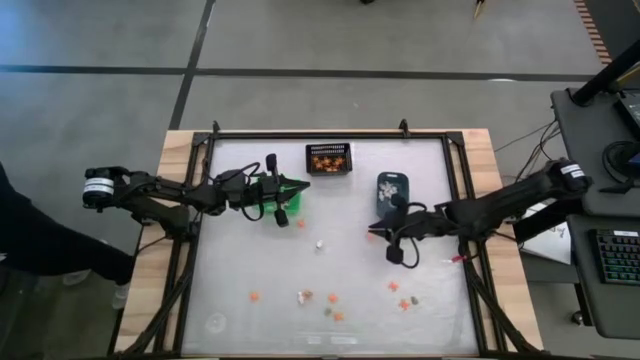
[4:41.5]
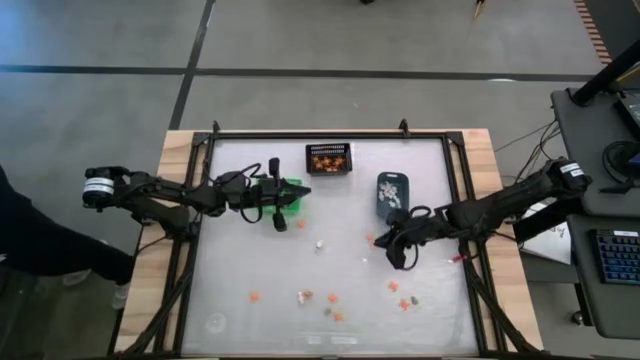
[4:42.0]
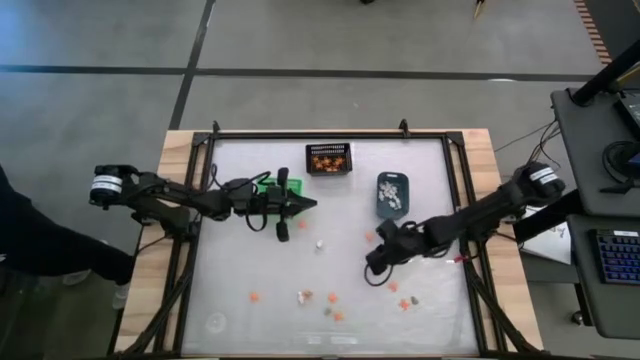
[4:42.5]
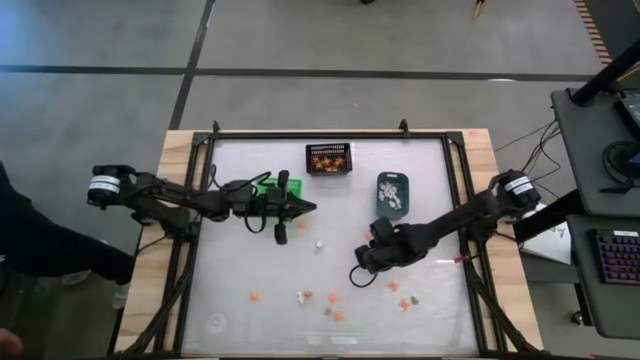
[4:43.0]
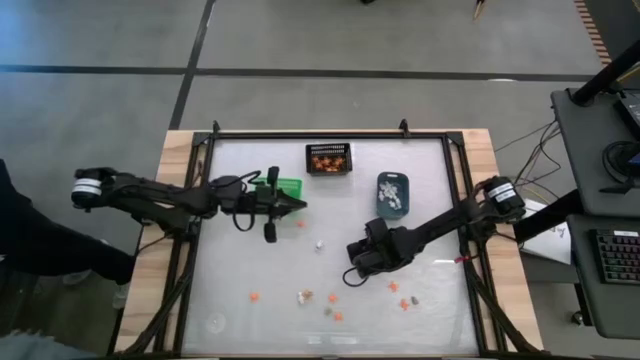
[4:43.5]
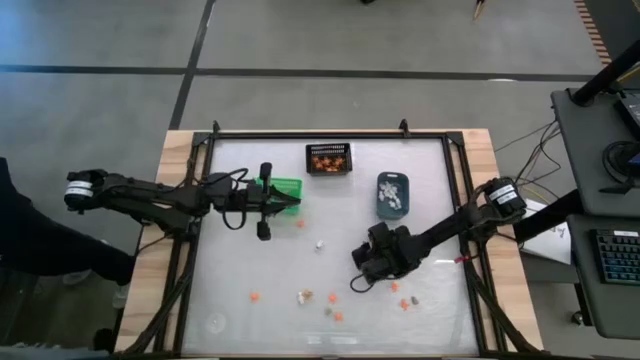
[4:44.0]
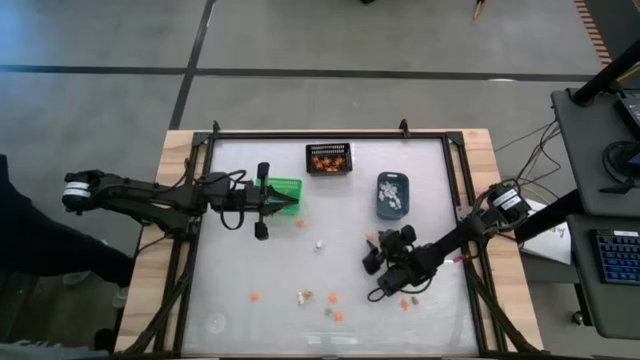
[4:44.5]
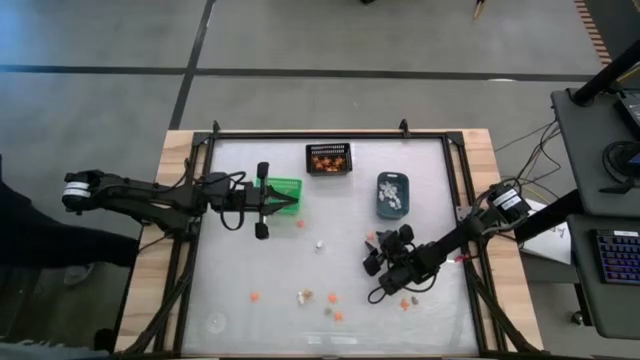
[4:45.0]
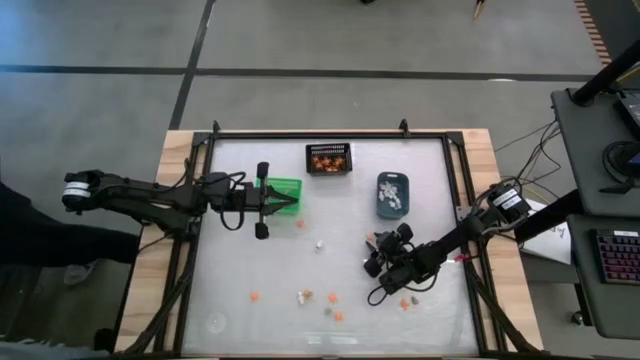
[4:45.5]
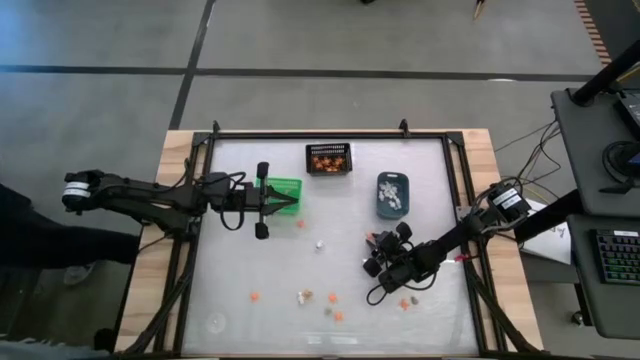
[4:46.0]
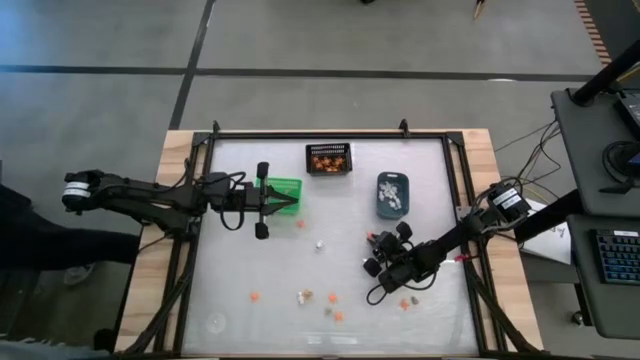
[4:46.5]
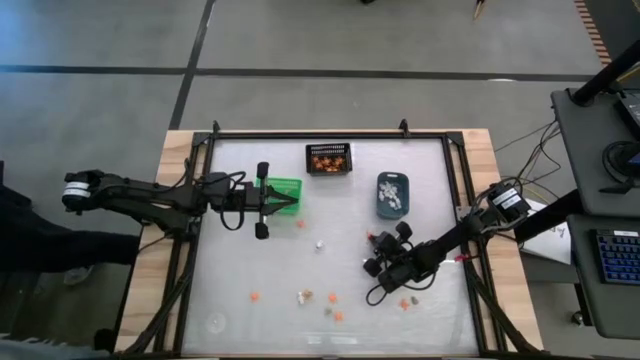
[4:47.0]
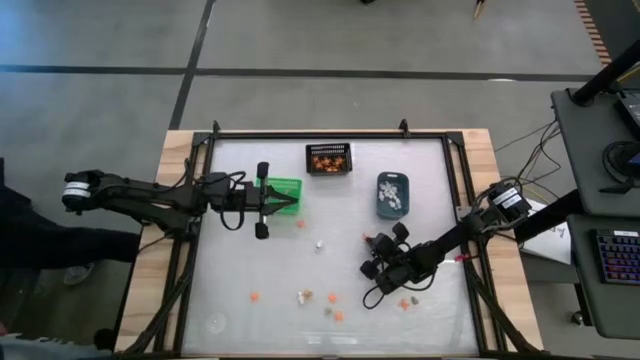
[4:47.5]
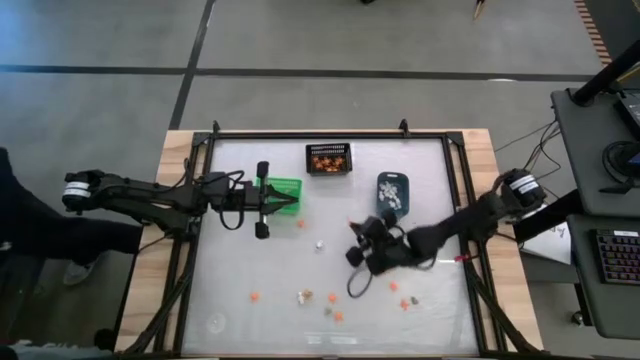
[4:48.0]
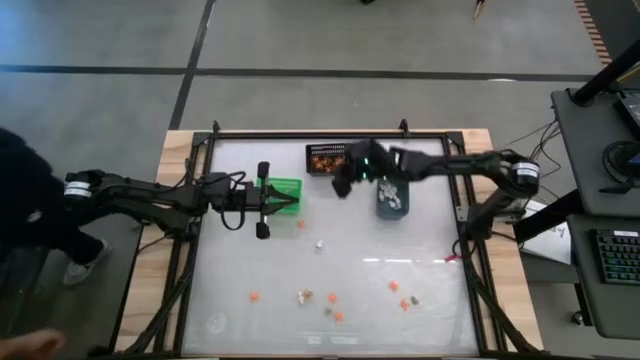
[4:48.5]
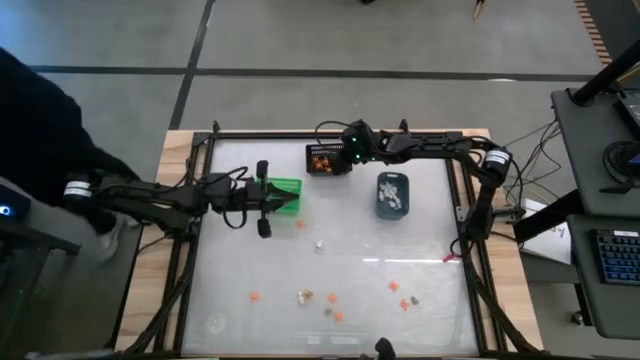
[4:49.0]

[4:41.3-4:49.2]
Task: Sort Halloween decoration
Put the orange spider toy into the black bin

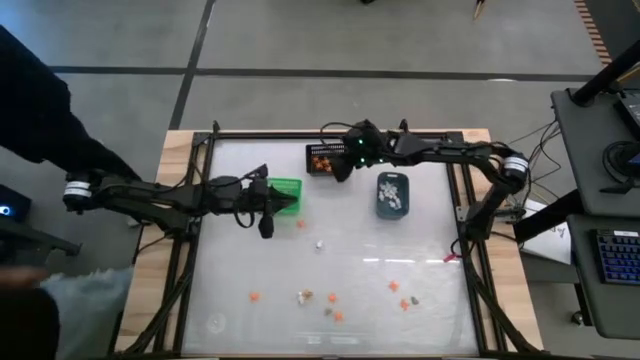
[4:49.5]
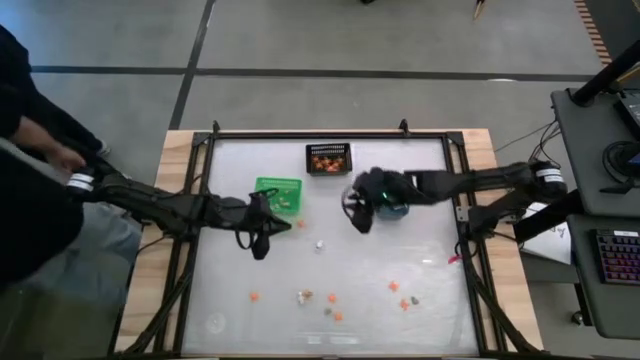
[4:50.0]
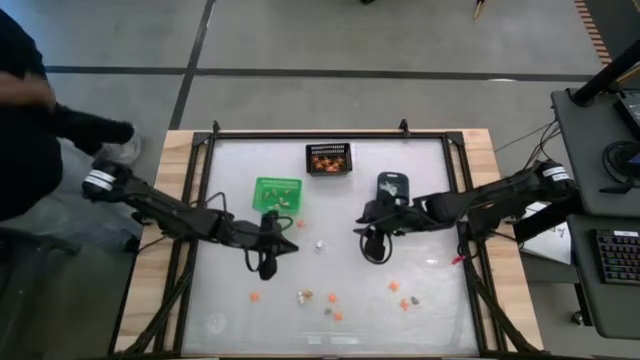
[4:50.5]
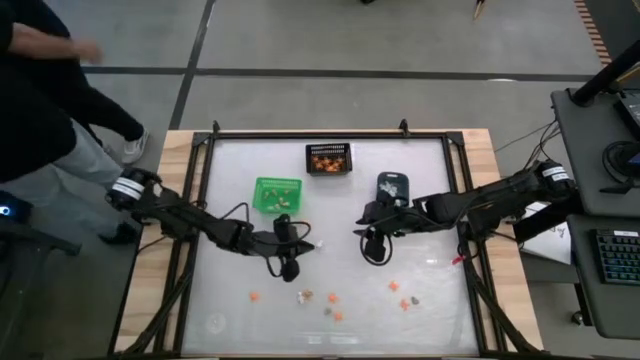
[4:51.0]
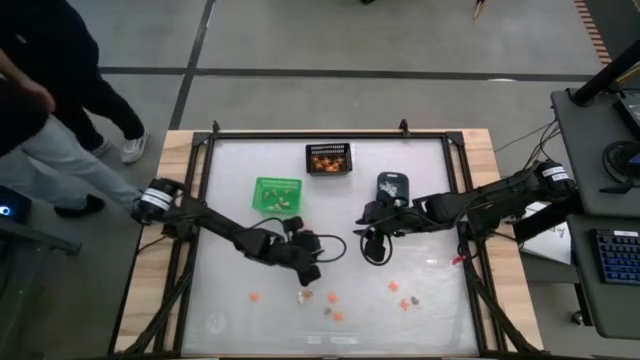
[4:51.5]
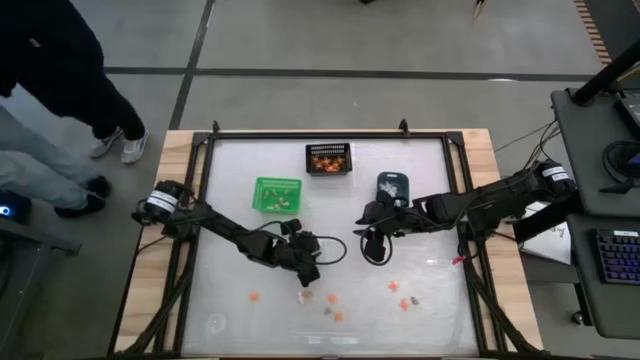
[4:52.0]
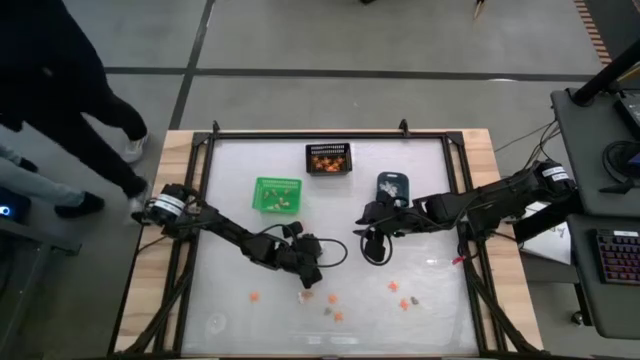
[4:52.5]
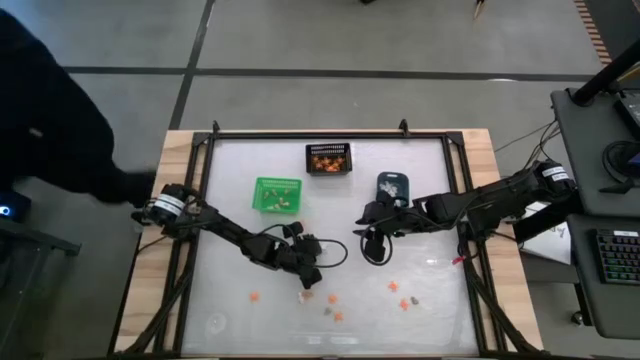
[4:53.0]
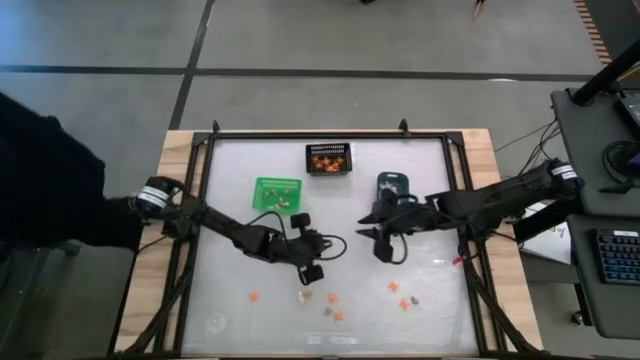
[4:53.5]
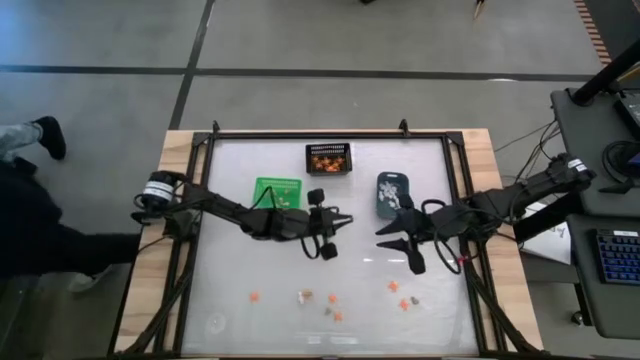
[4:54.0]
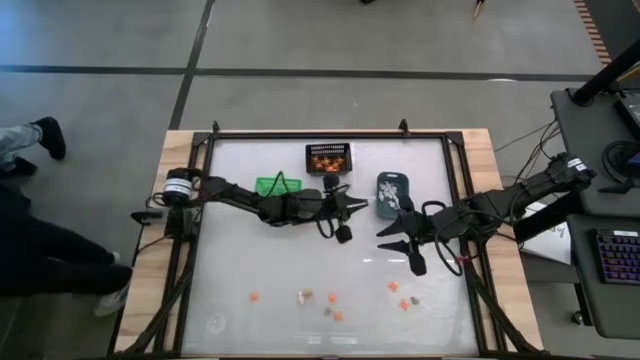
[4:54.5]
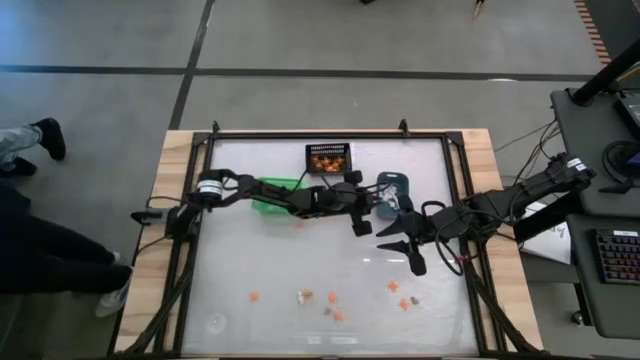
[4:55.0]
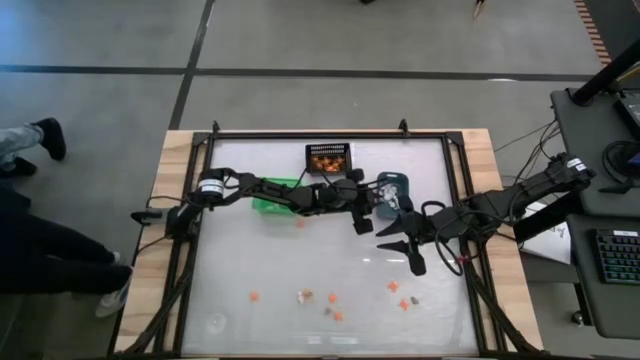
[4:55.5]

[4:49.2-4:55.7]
Put the white skeleton toy into the blue bin

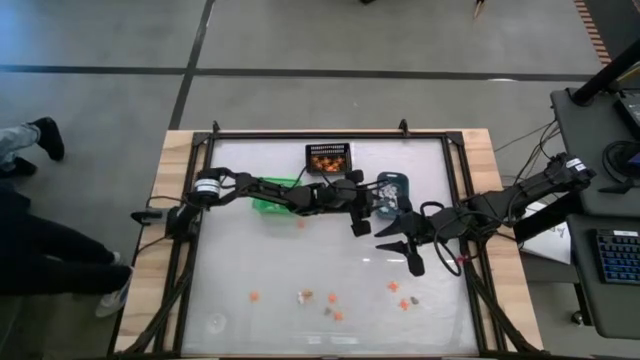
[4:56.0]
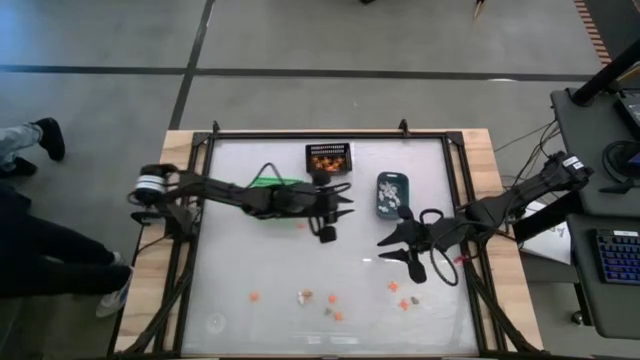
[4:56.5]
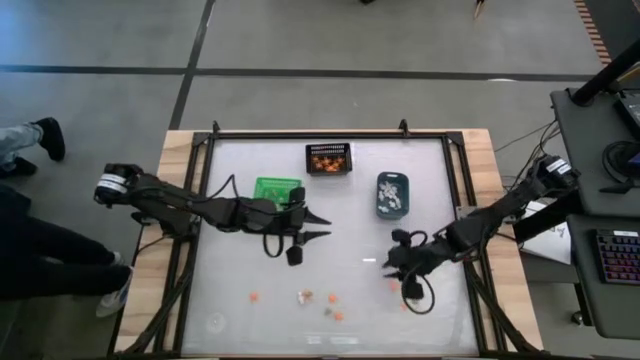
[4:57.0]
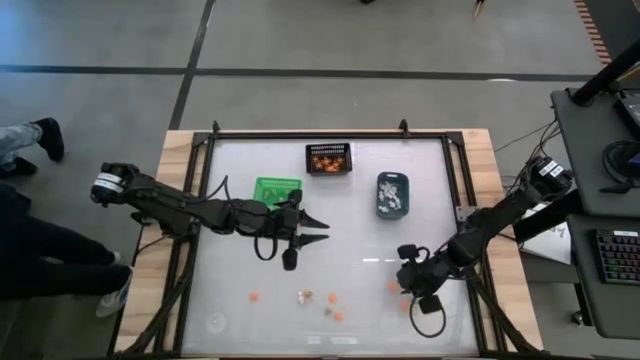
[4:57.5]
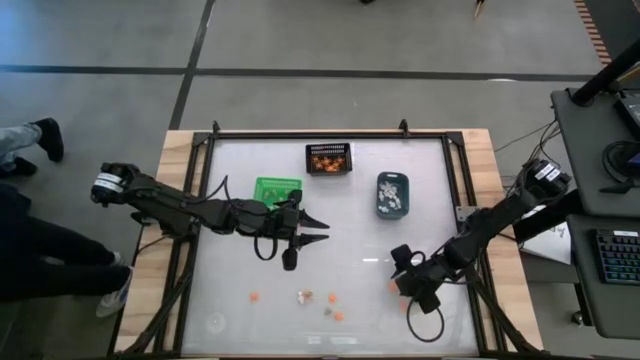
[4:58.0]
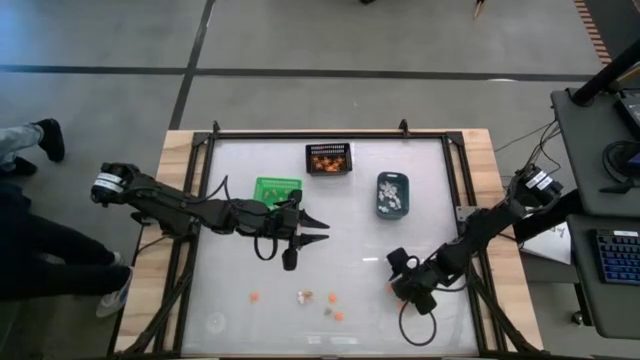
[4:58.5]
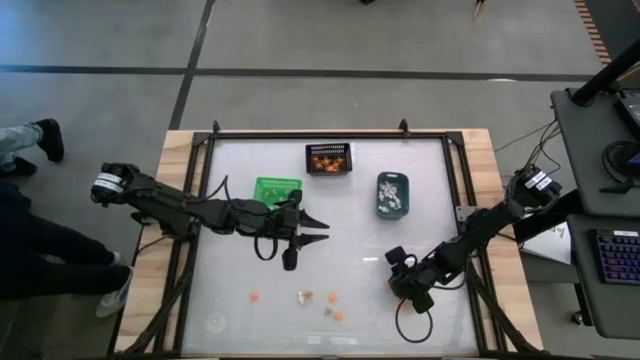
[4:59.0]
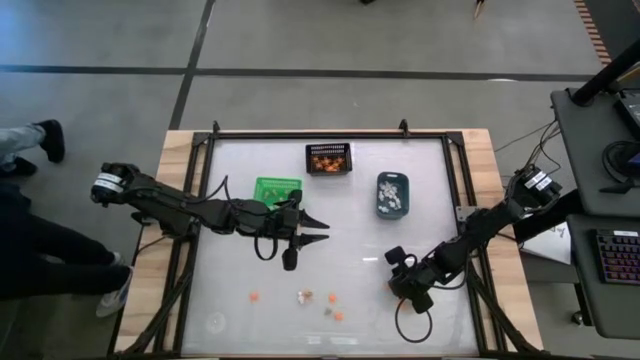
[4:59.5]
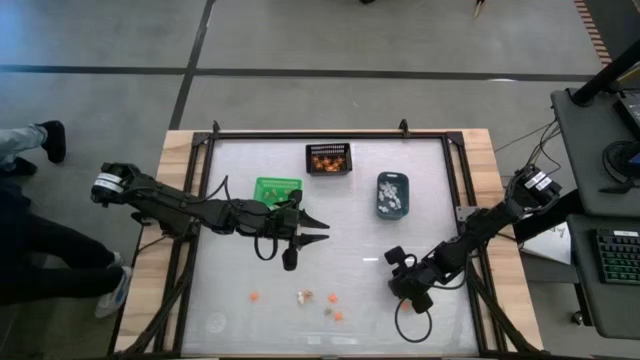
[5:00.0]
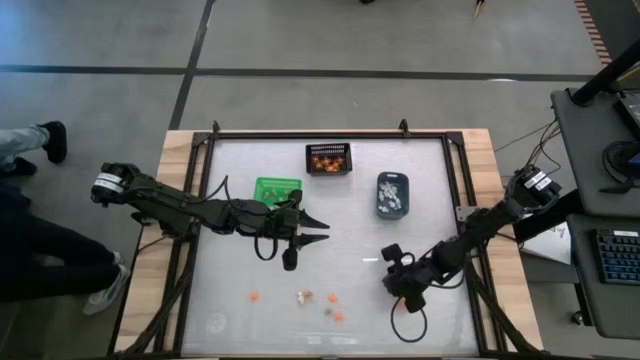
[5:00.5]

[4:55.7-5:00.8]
Put the orange spider toy into the black bin

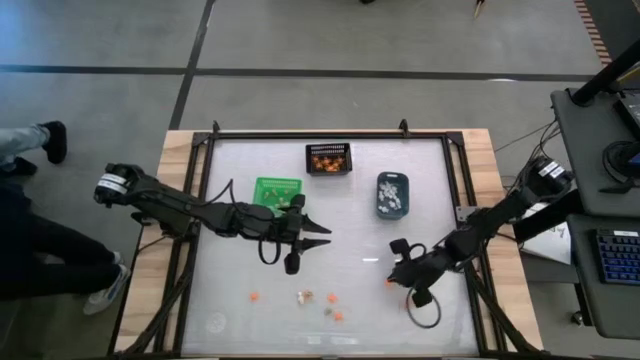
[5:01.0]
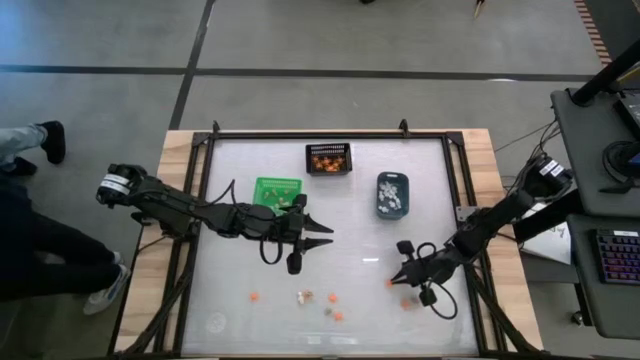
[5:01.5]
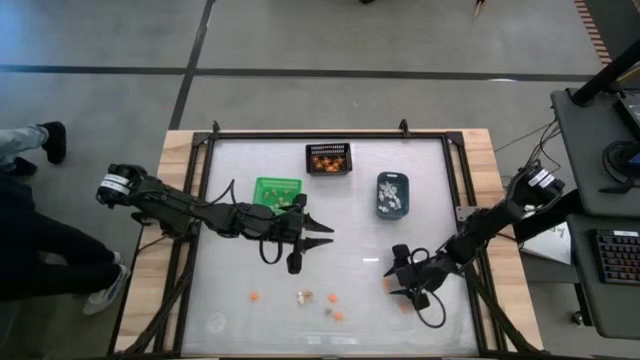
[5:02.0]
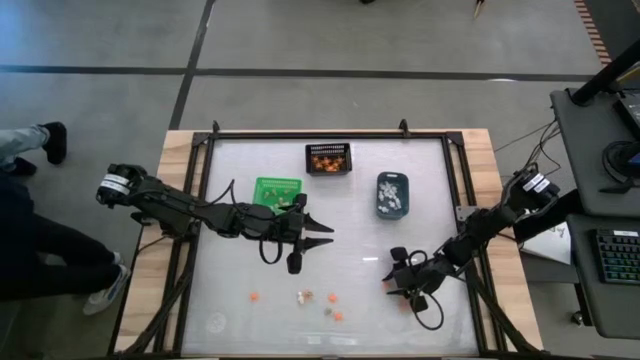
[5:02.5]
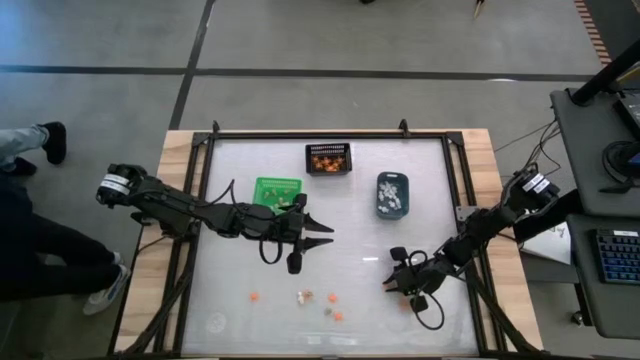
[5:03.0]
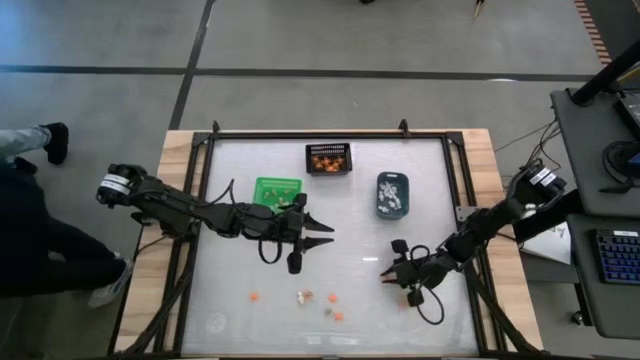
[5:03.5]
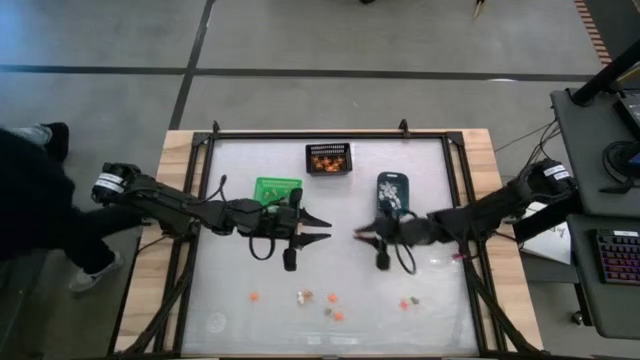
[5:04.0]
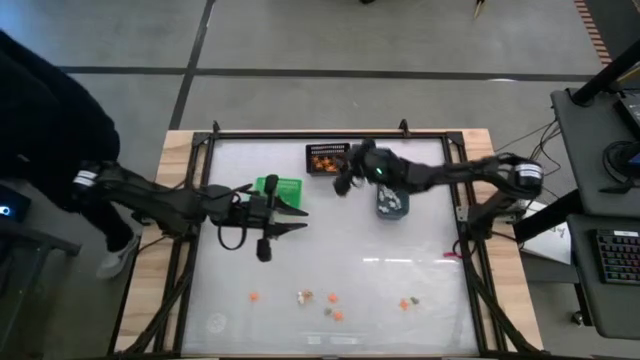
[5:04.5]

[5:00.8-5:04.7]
Put the orange spider toy into the black bin
